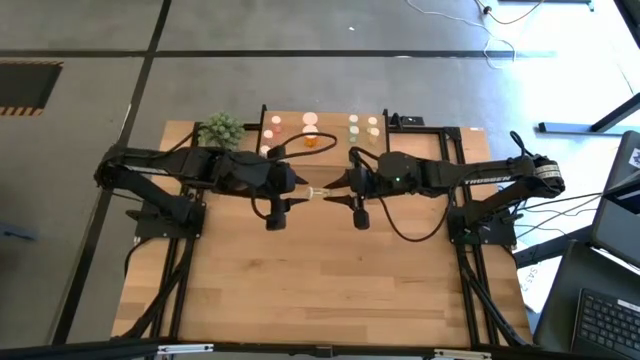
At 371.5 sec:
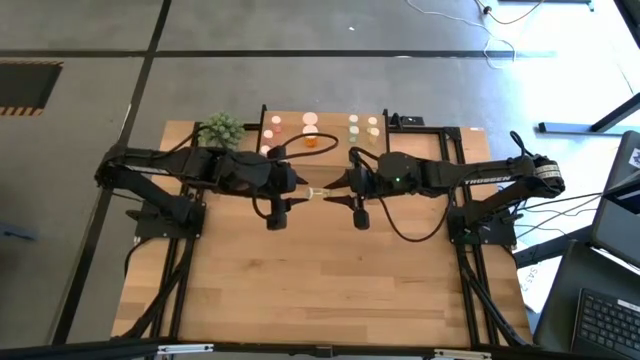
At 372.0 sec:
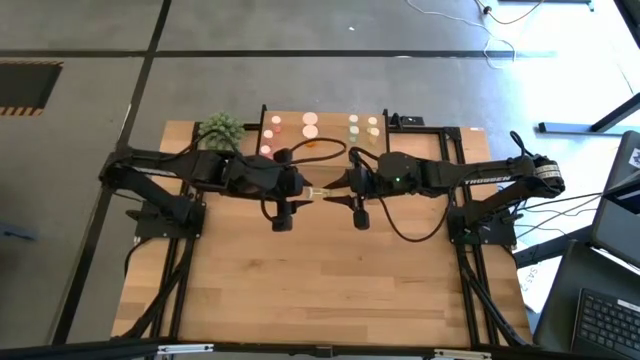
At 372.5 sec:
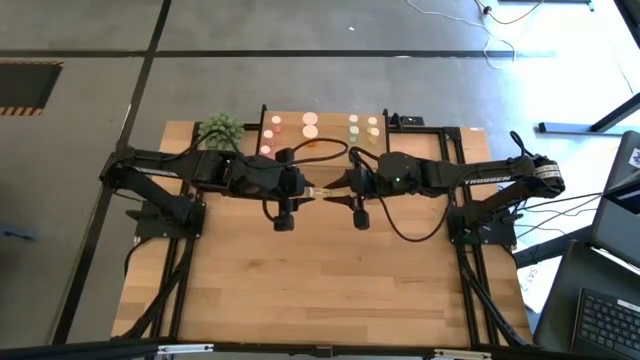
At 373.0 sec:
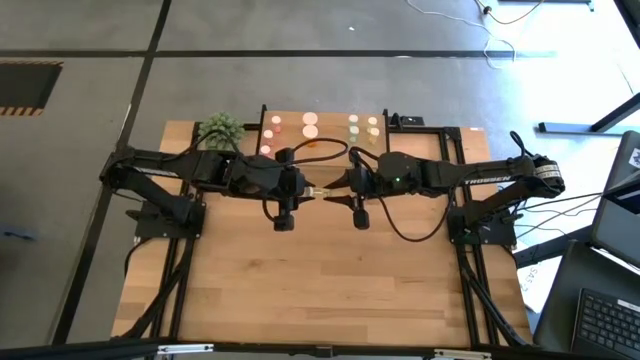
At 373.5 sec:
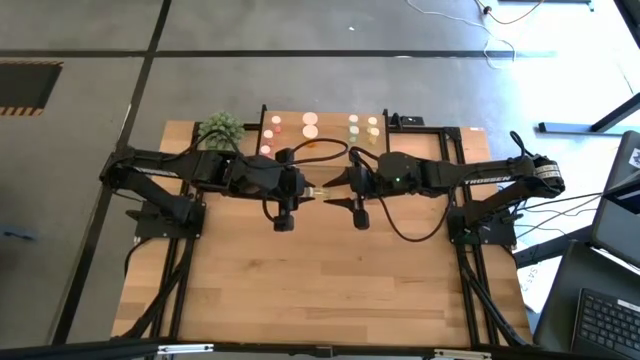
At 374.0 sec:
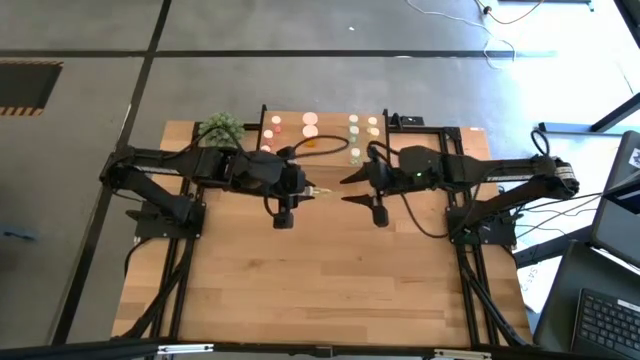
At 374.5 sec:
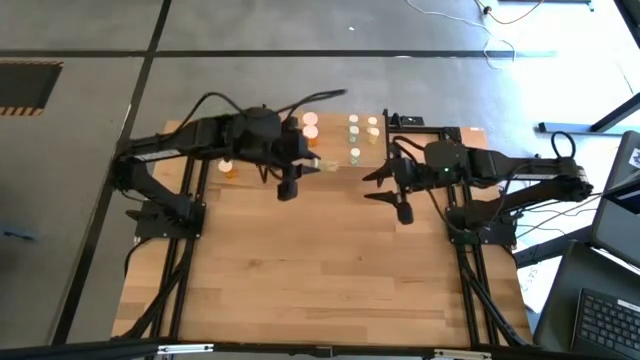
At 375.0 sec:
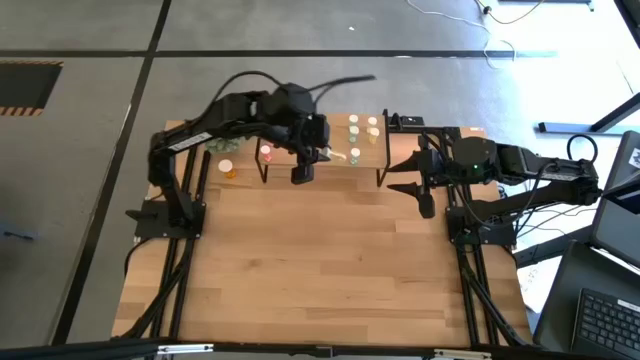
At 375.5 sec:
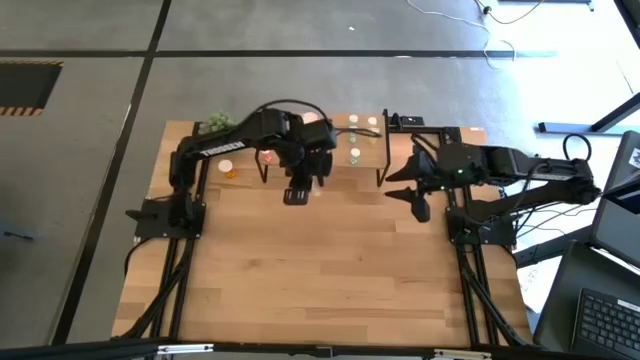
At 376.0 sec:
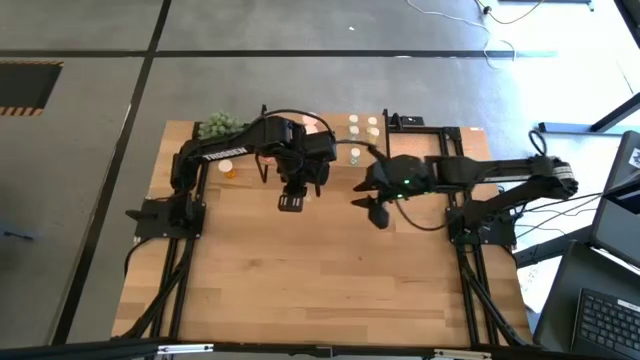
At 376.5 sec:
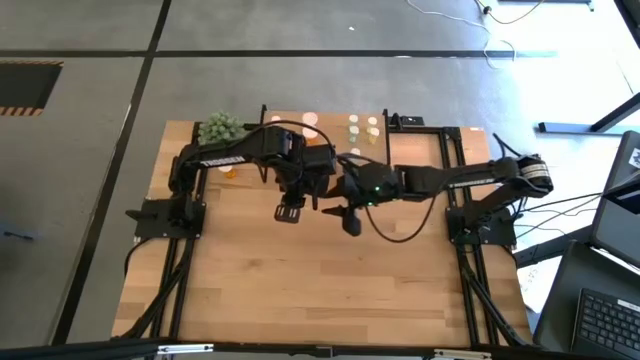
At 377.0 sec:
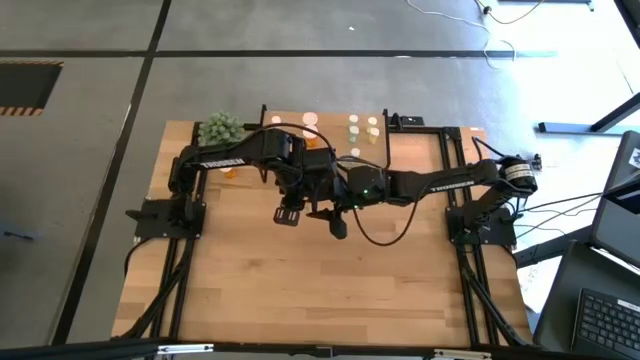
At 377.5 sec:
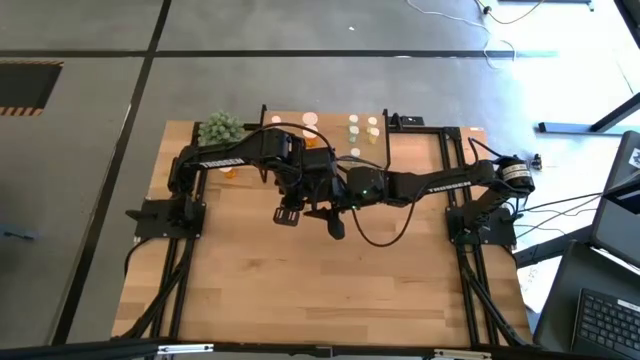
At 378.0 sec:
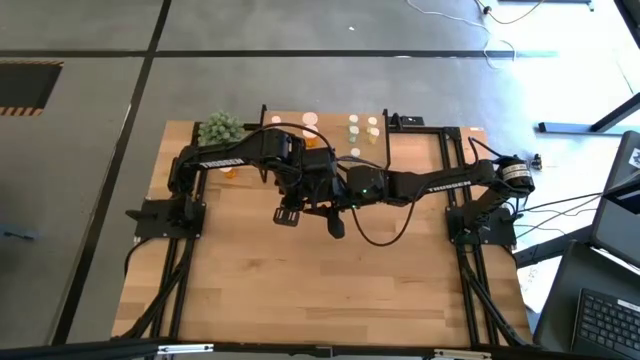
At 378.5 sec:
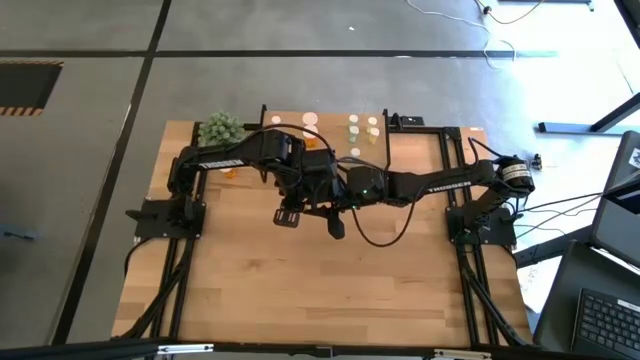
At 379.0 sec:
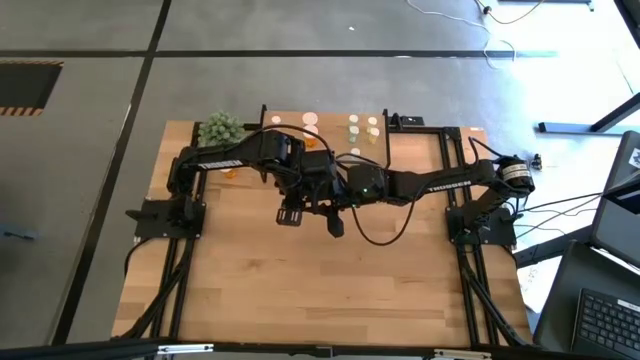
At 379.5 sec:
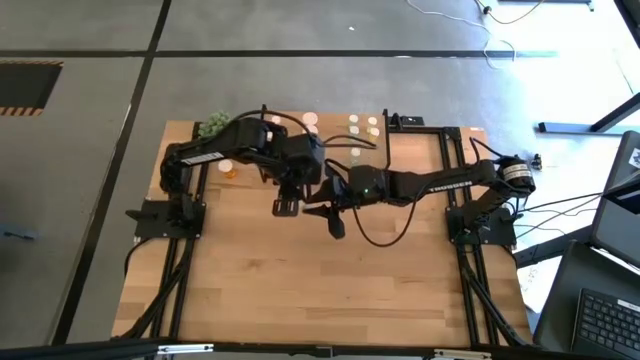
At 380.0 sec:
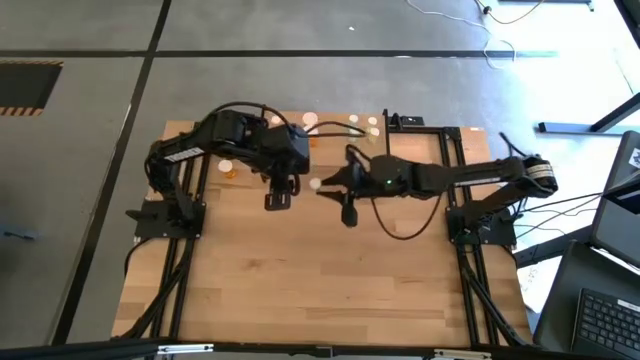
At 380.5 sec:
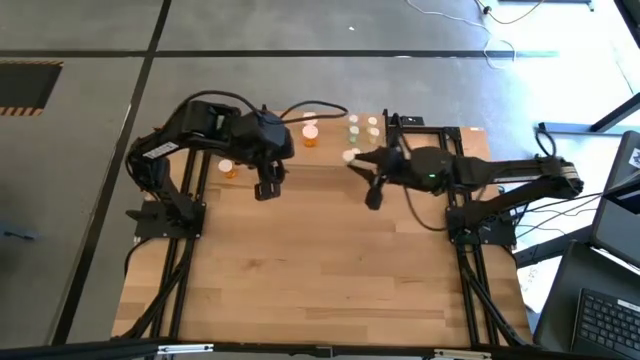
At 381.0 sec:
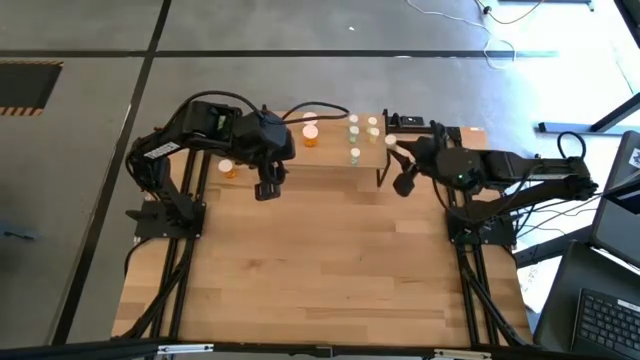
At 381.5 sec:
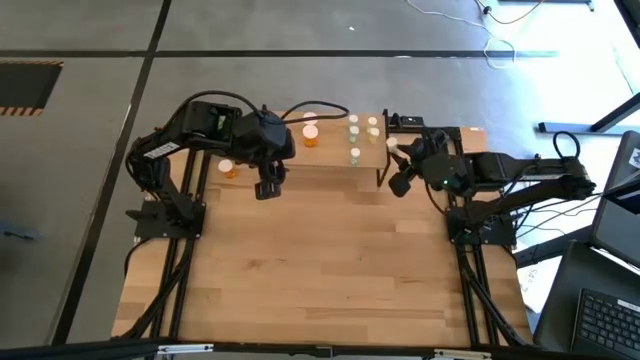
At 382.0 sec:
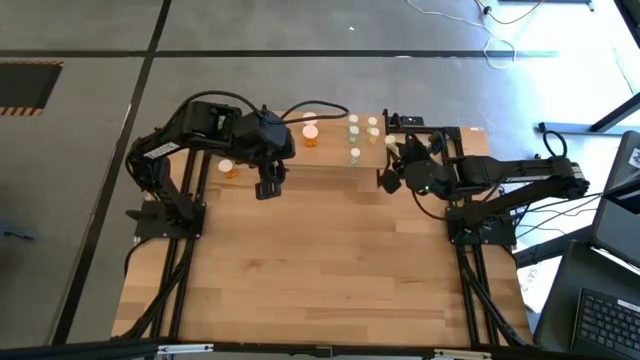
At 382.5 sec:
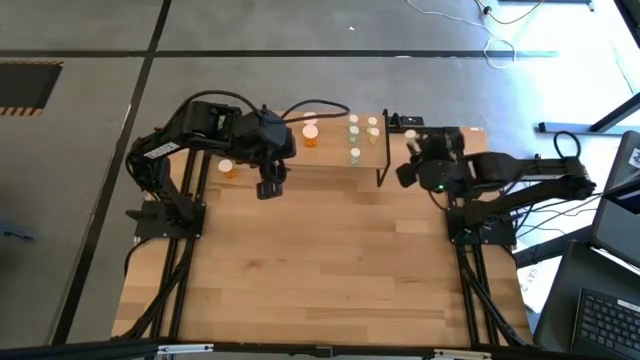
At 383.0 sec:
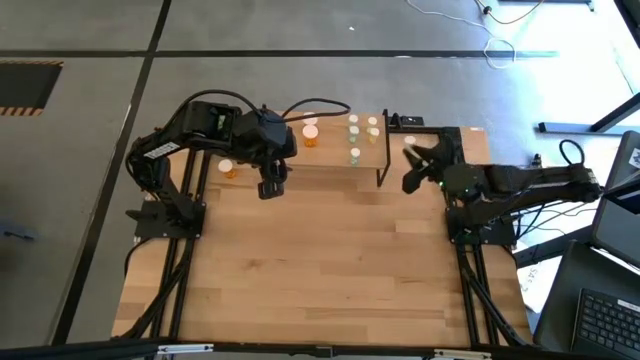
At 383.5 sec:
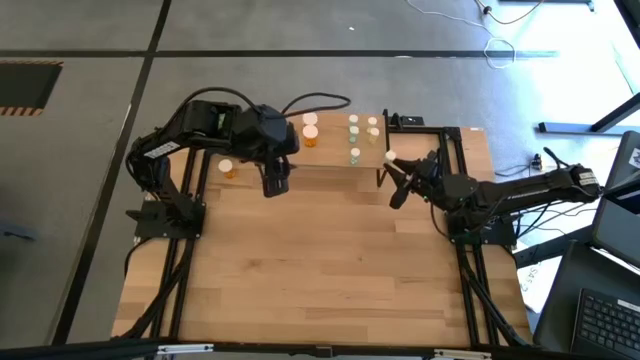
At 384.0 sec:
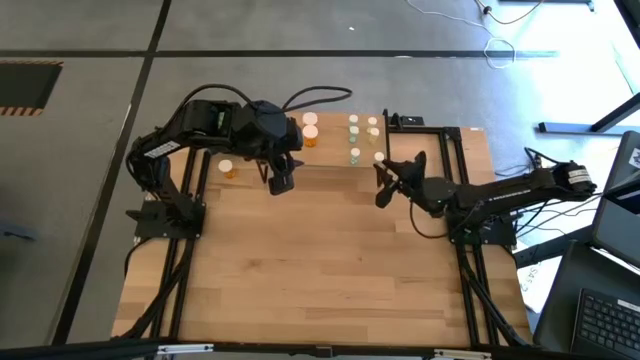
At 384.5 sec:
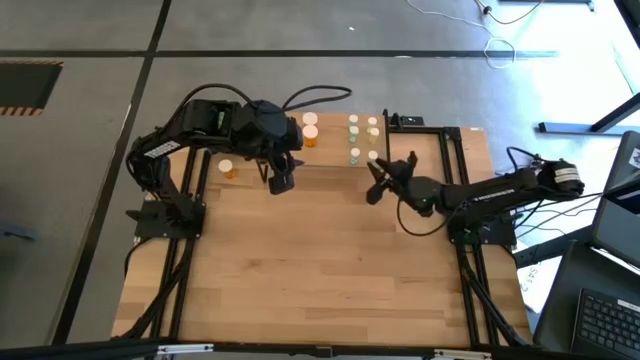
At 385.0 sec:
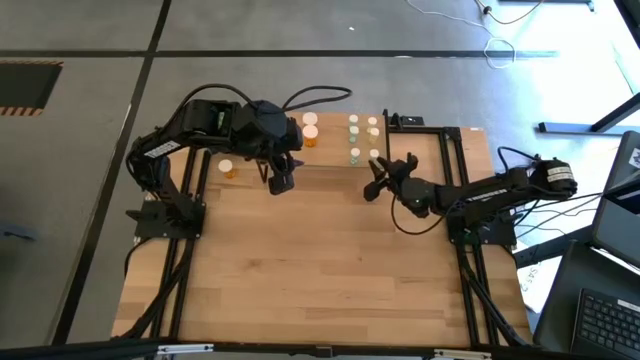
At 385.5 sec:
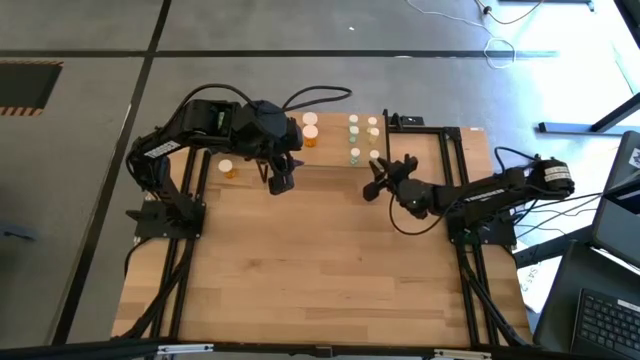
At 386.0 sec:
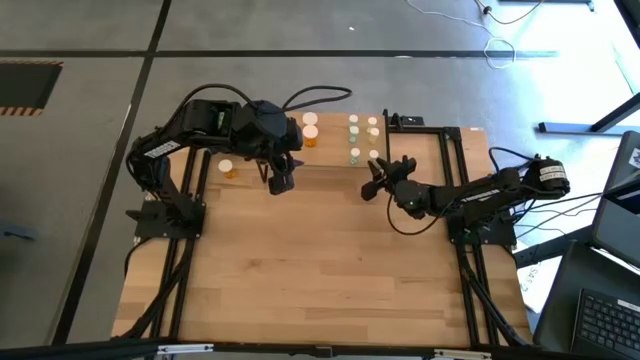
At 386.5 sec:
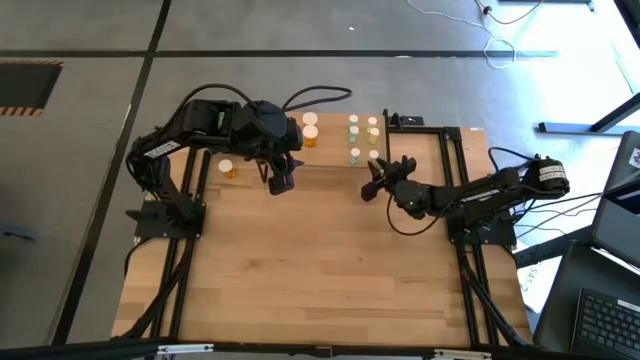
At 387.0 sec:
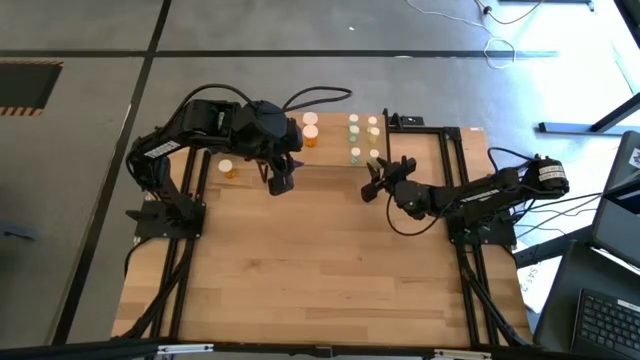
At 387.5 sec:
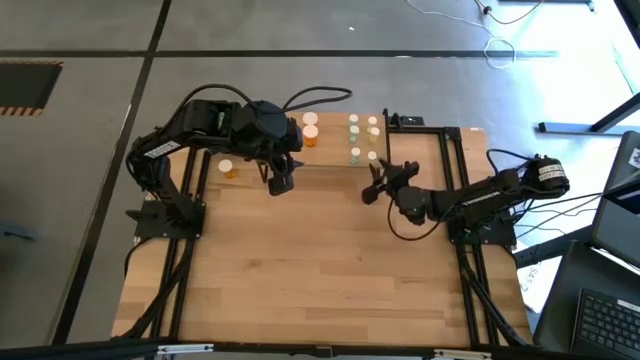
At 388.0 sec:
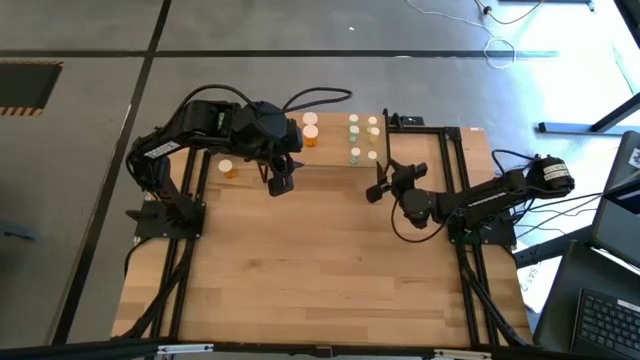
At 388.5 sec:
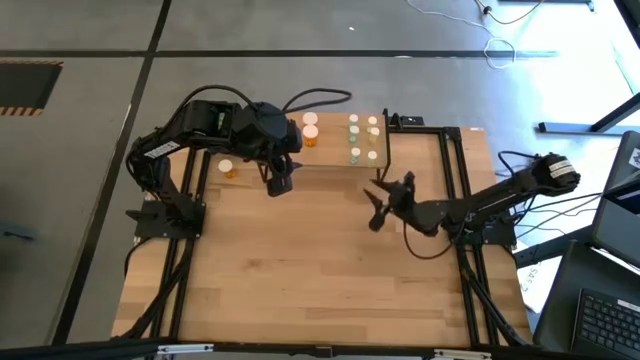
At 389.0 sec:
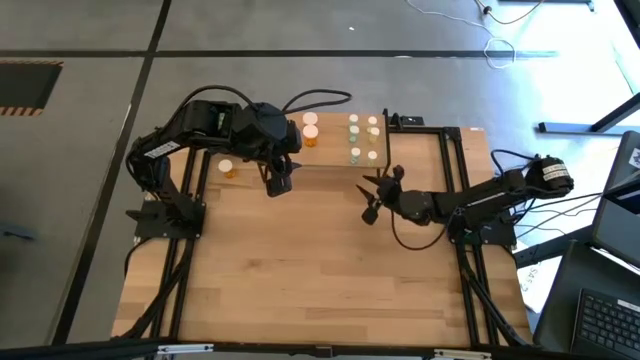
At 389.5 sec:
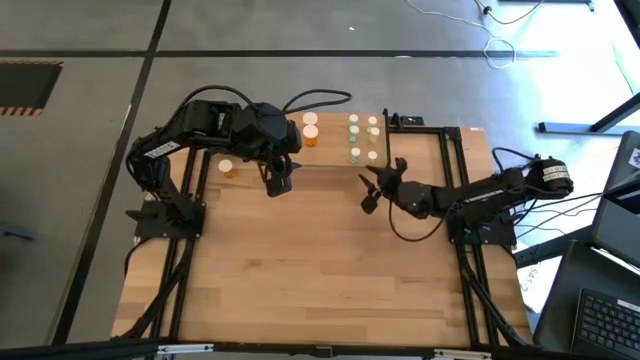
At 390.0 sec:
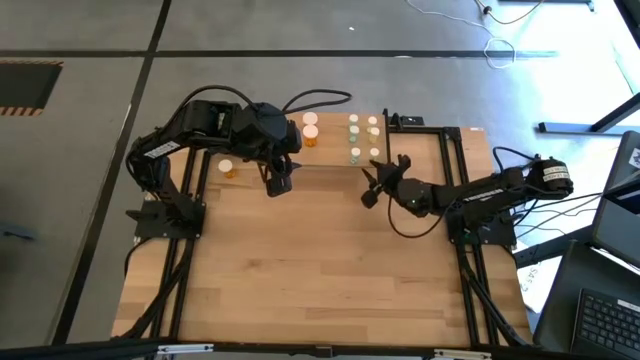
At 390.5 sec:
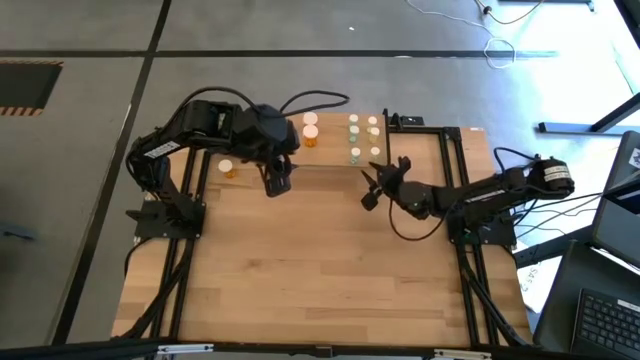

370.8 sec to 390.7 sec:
Task: Pick and place medicine bottles onto shelf by color
Put the yellow medicine bottle on the shelf, aligned with the other yellow medicine bottle
